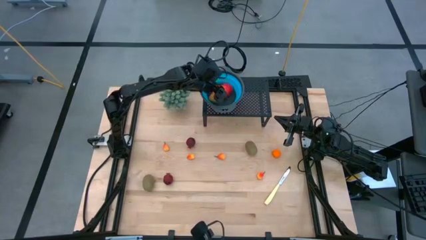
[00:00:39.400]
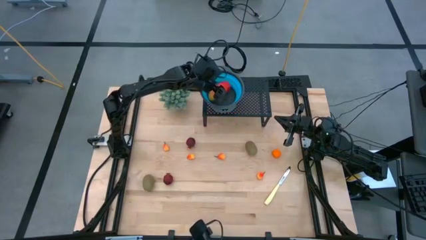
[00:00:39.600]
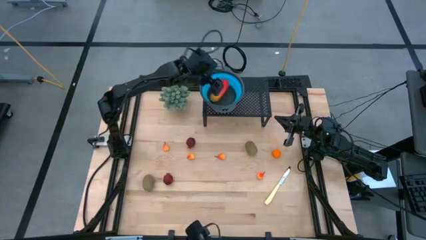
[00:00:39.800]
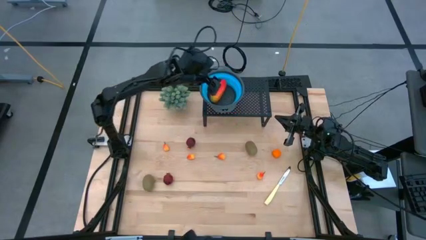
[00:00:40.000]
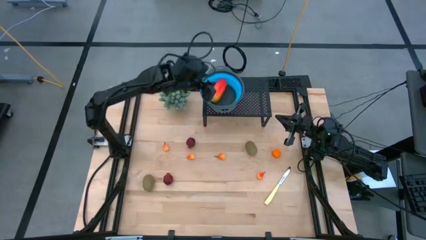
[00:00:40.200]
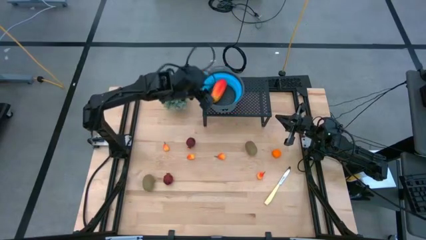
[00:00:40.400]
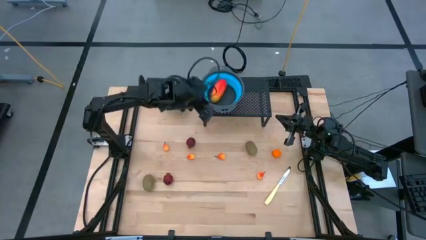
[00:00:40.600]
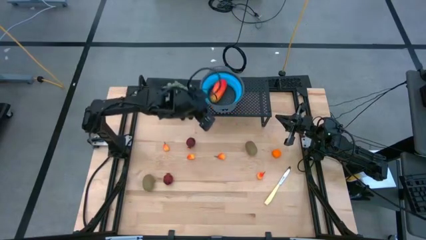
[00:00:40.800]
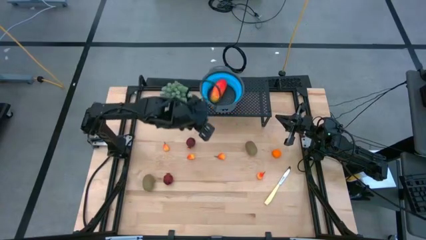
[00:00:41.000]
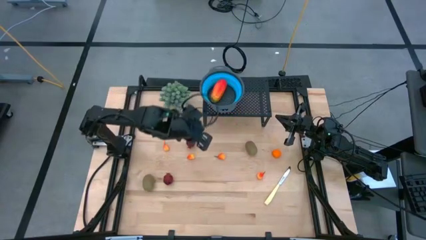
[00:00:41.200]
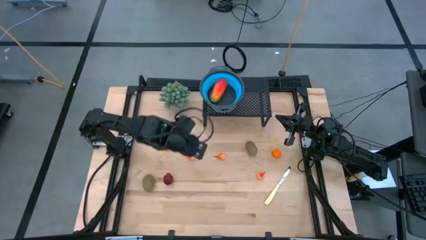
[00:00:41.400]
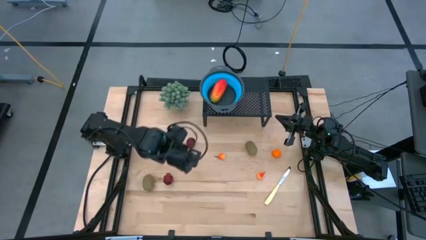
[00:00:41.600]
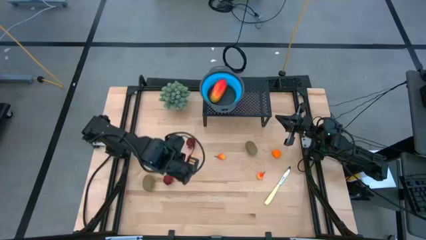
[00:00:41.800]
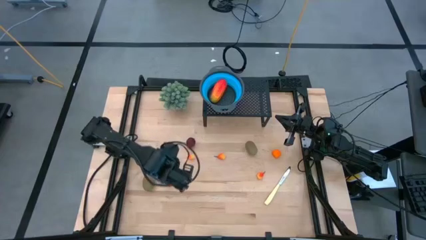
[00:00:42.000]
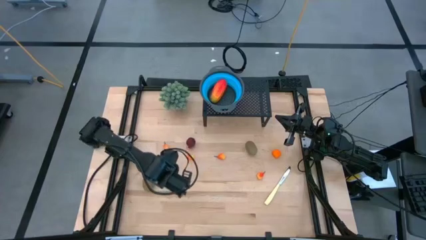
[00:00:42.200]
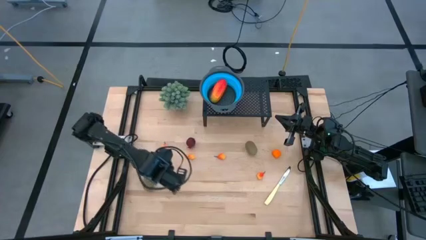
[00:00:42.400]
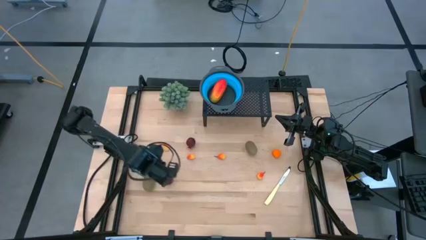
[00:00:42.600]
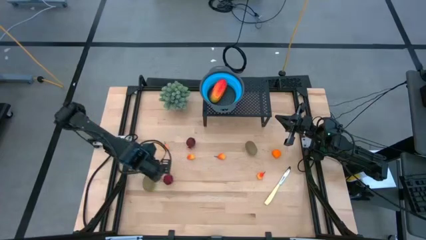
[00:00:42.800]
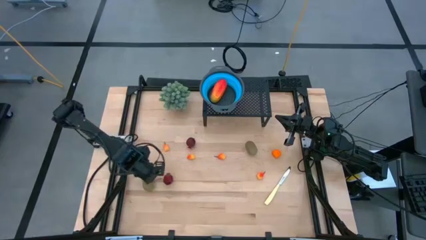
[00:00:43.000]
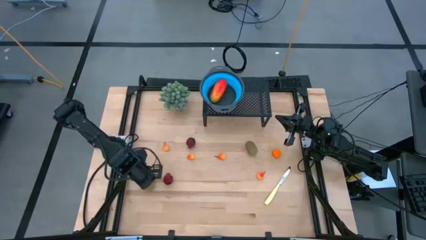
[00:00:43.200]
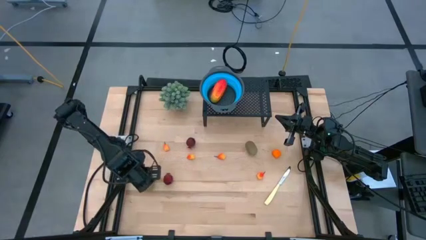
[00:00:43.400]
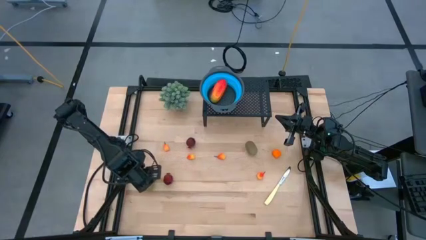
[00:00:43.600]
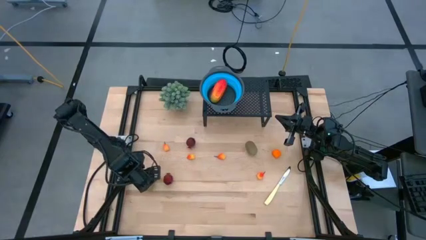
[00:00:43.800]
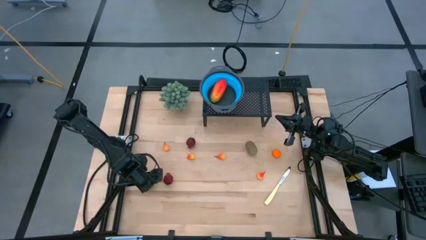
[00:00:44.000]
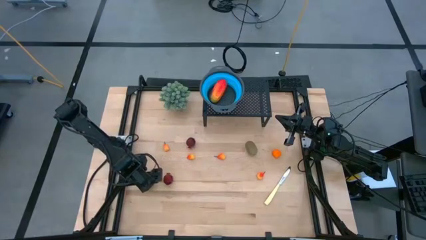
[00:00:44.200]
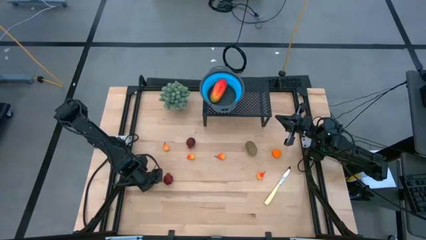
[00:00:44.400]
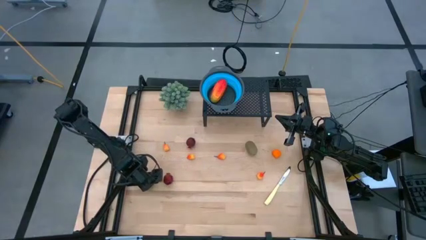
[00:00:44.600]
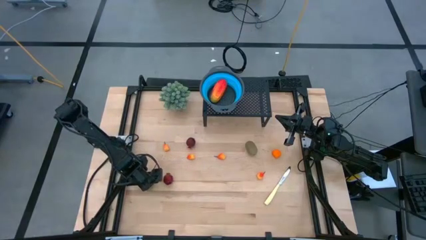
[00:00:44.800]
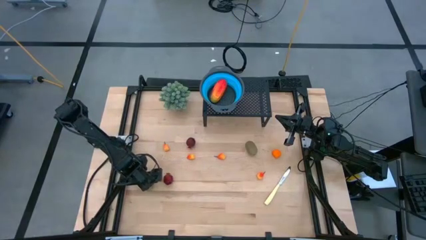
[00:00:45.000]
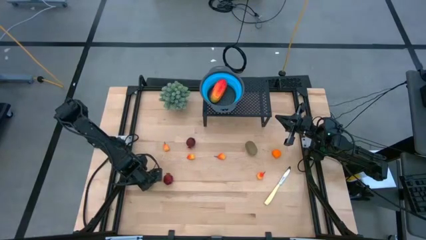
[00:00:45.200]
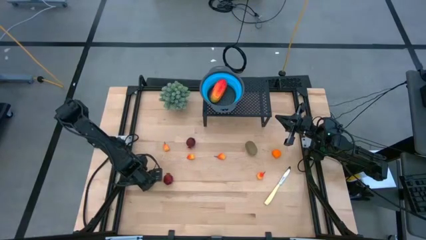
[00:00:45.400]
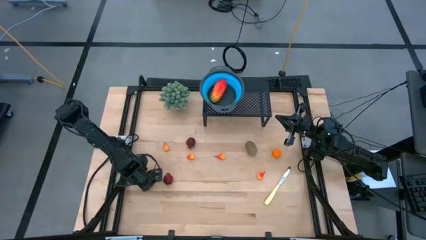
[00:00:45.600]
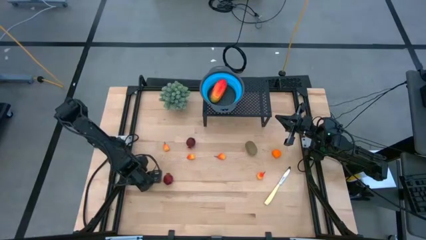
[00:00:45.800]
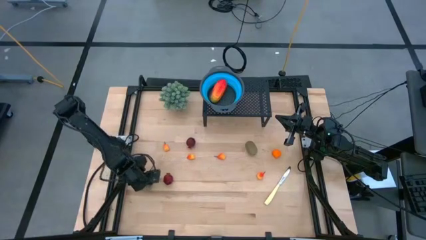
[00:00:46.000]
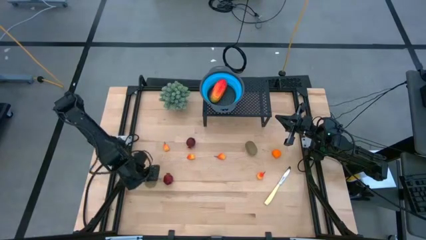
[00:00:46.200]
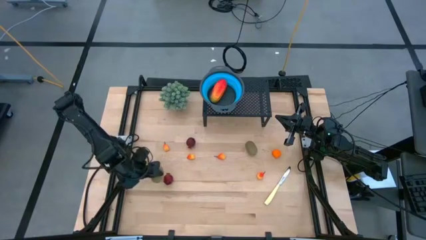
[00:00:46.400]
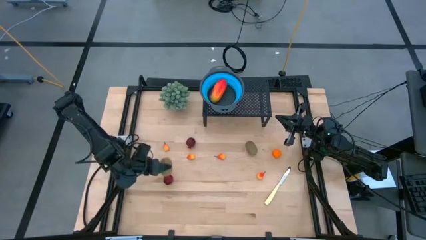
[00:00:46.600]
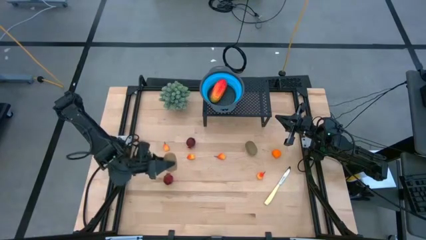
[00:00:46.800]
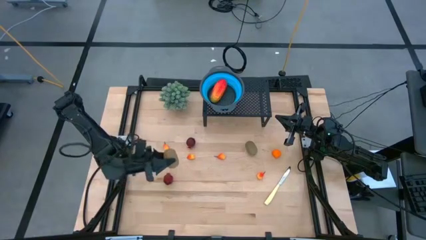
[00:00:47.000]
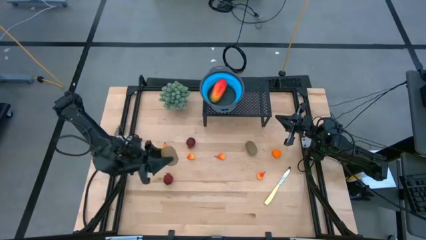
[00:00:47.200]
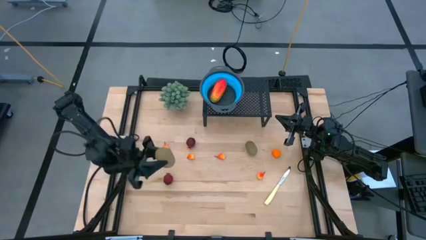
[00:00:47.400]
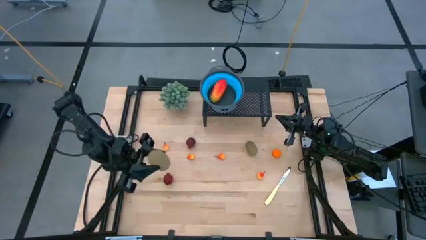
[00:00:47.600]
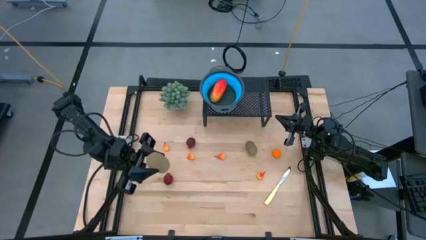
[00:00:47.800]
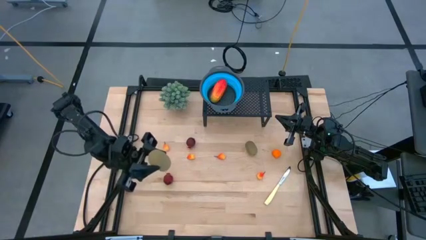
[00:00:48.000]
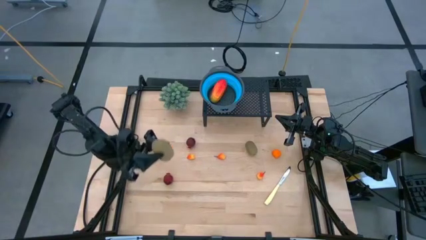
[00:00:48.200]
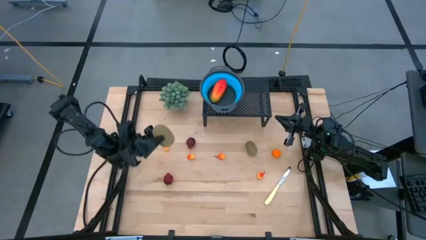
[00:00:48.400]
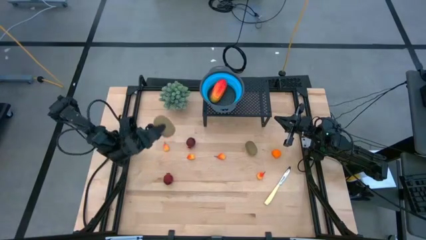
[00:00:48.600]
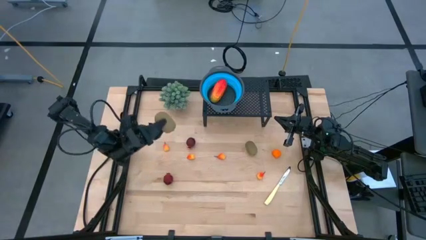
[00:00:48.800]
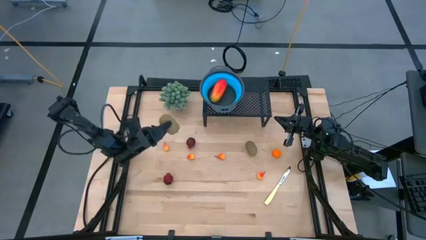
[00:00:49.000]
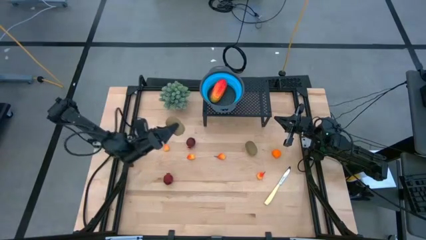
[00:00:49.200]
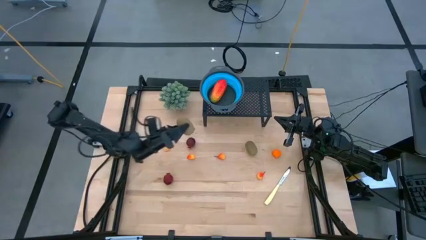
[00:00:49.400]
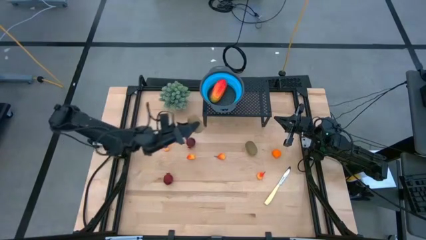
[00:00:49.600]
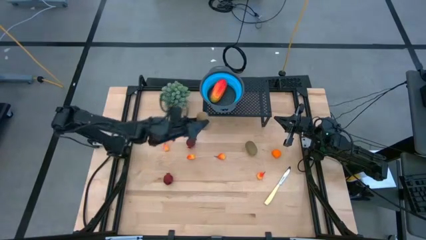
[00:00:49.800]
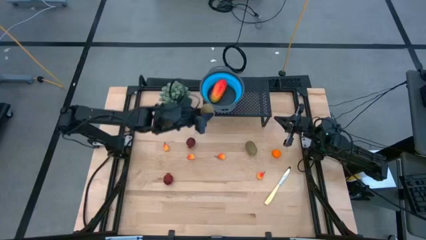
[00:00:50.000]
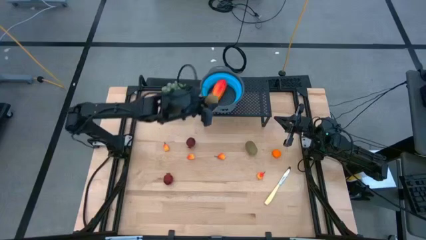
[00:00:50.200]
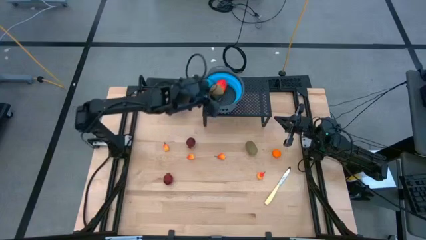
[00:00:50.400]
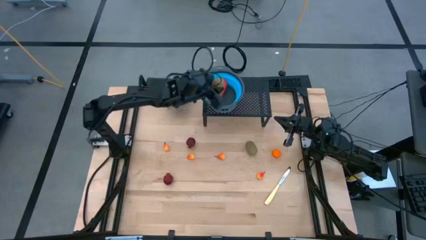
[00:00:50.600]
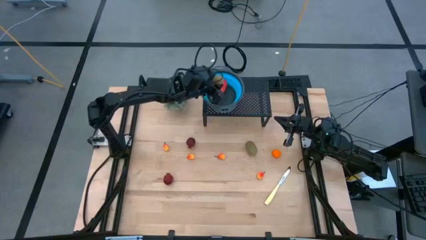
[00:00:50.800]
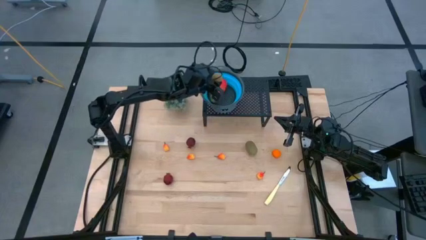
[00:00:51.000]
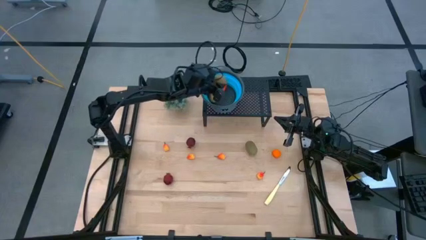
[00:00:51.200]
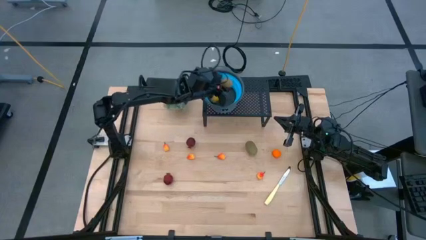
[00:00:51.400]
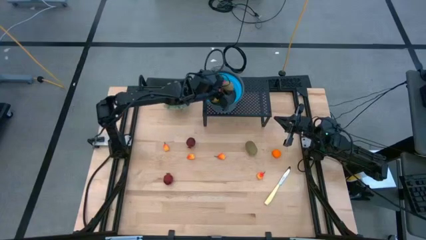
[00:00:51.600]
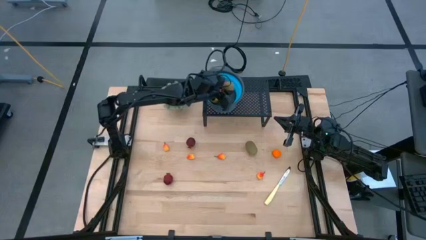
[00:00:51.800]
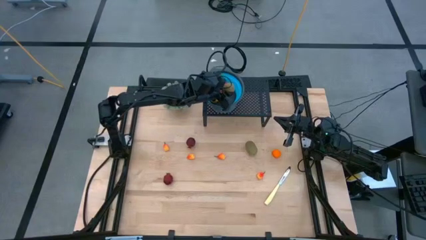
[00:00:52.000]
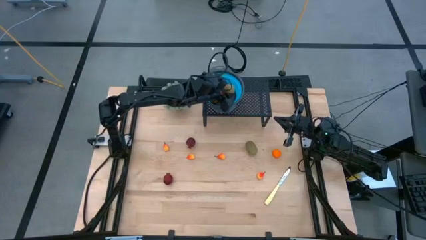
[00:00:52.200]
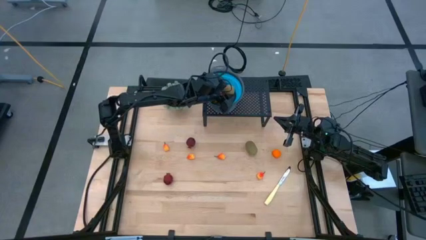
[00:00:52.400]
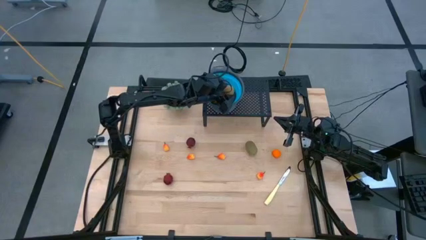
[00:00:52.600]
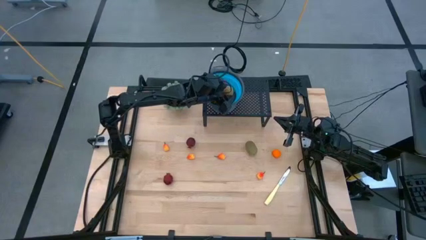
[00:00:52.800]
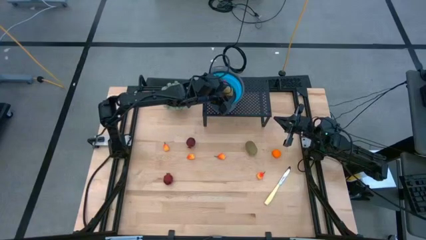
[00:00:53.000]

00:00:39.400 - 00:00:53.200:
Task: Pick & Place Fruit
Put the brown kiwi into the blue strainer bowl on the shelf
